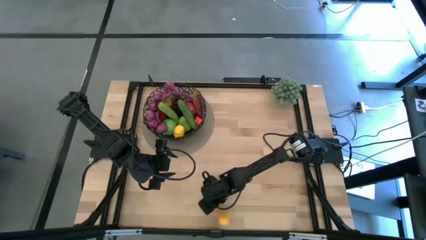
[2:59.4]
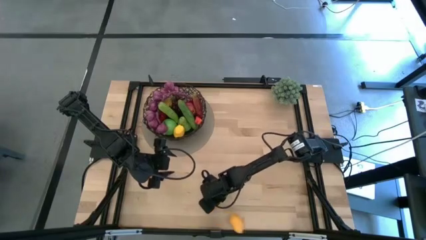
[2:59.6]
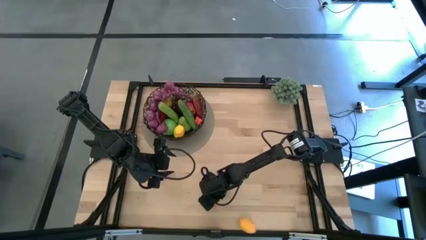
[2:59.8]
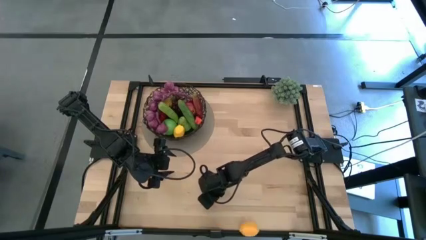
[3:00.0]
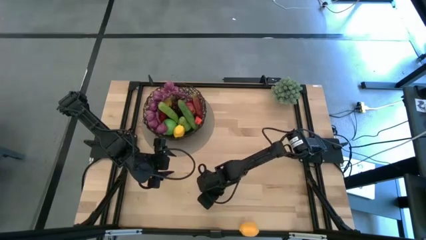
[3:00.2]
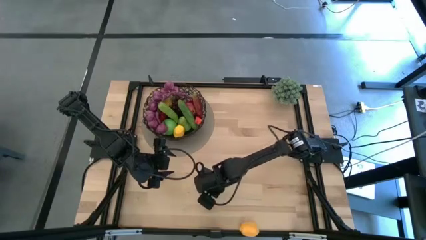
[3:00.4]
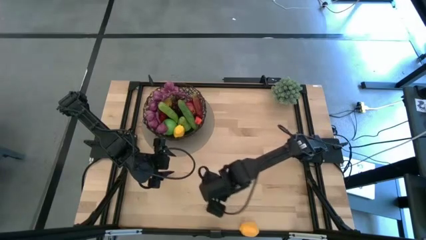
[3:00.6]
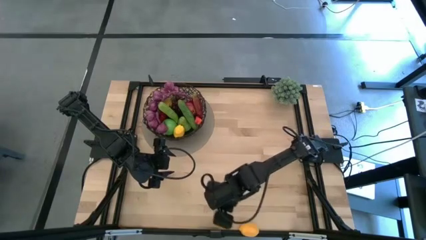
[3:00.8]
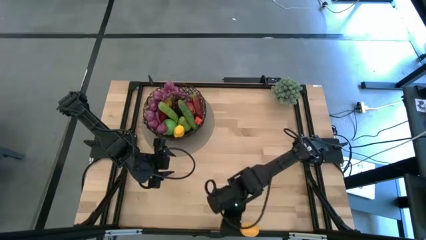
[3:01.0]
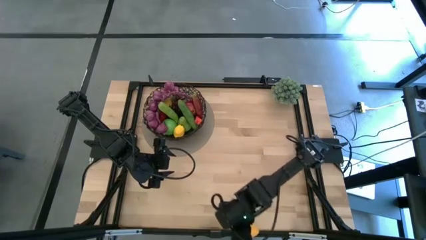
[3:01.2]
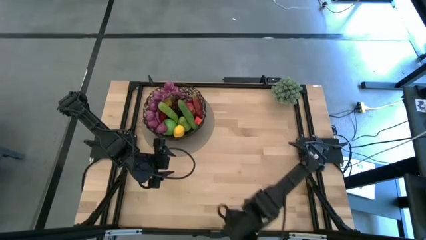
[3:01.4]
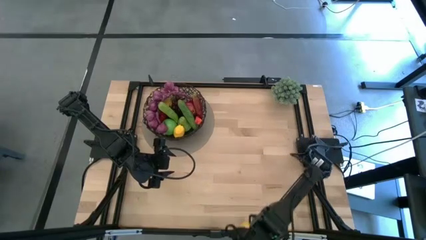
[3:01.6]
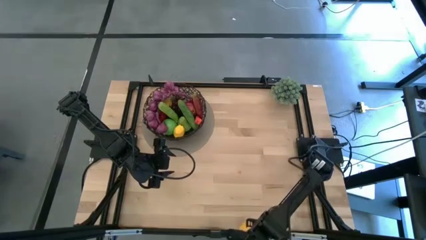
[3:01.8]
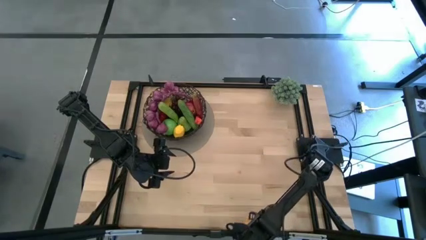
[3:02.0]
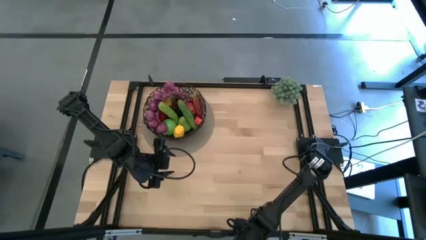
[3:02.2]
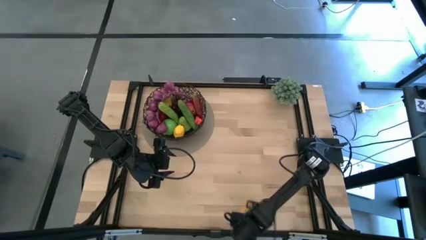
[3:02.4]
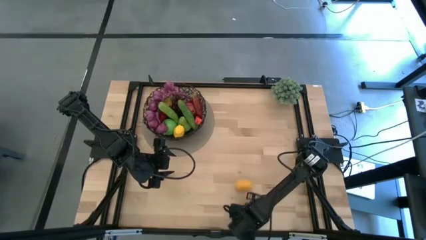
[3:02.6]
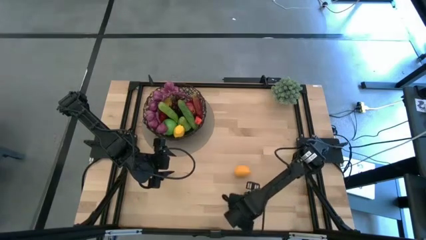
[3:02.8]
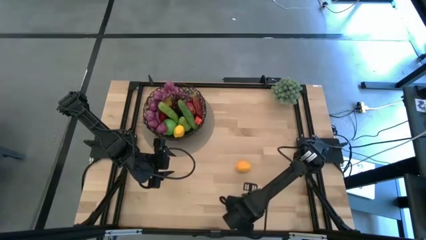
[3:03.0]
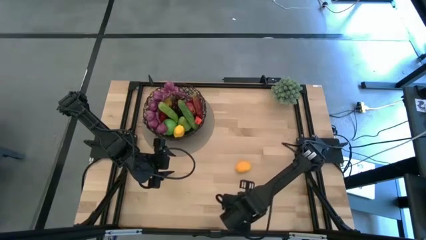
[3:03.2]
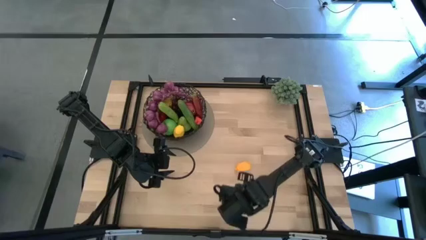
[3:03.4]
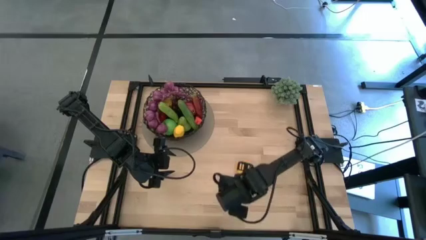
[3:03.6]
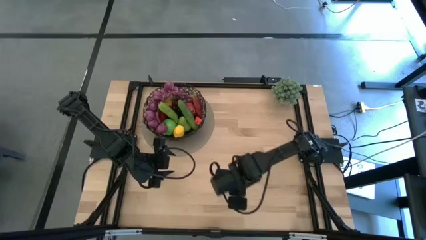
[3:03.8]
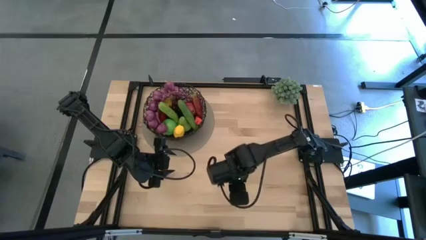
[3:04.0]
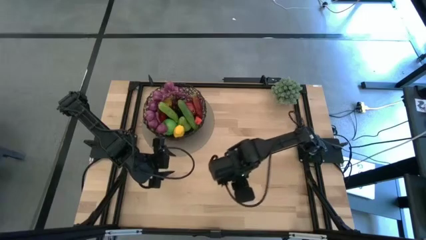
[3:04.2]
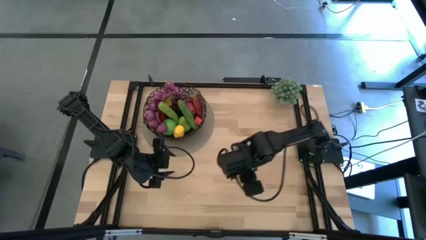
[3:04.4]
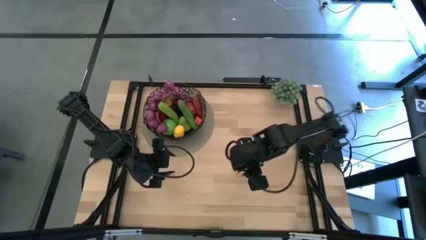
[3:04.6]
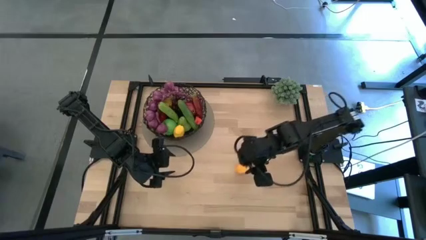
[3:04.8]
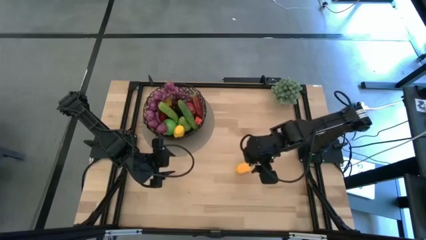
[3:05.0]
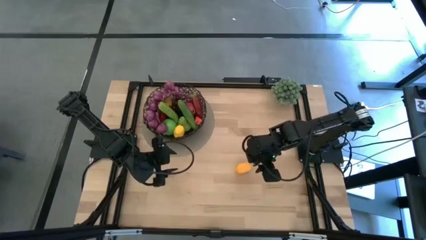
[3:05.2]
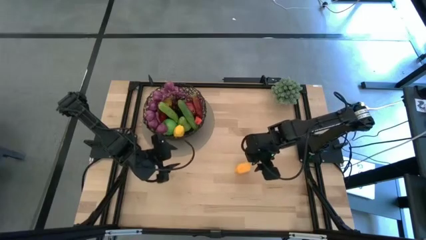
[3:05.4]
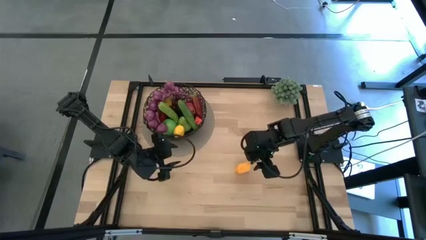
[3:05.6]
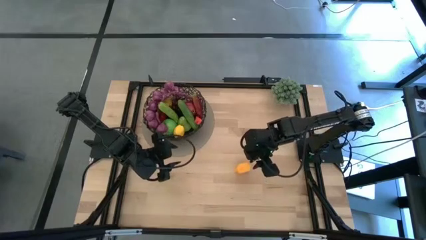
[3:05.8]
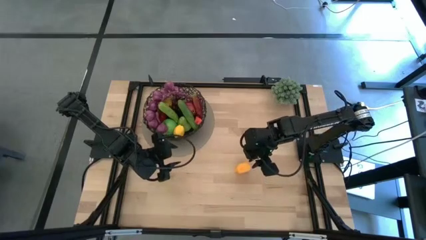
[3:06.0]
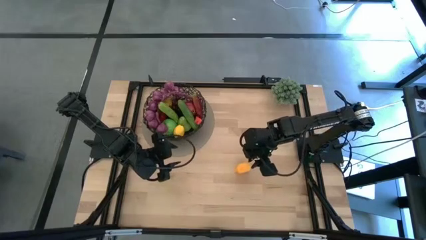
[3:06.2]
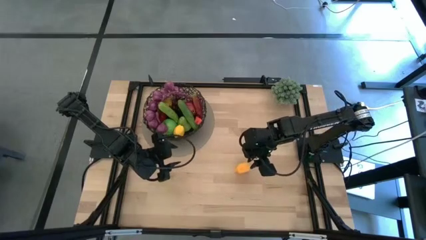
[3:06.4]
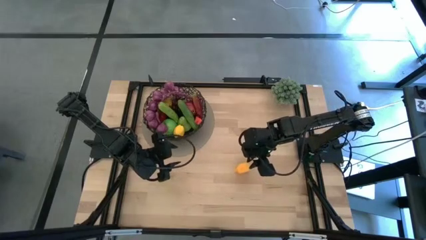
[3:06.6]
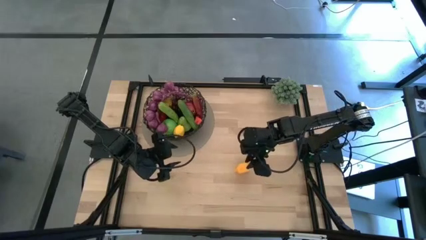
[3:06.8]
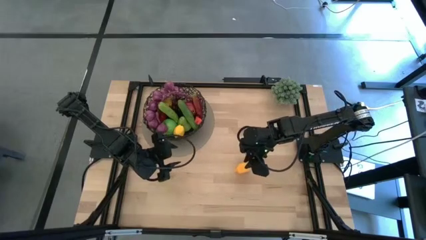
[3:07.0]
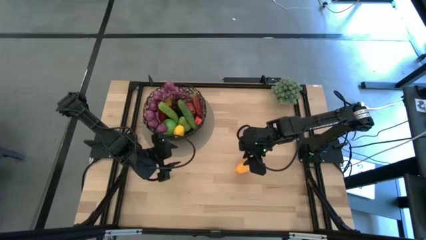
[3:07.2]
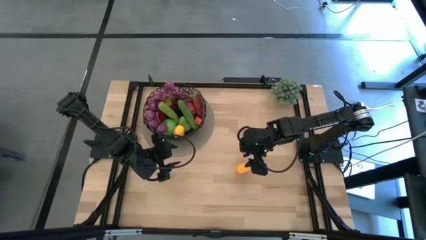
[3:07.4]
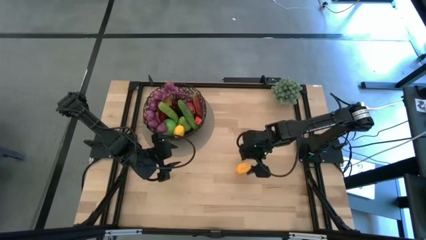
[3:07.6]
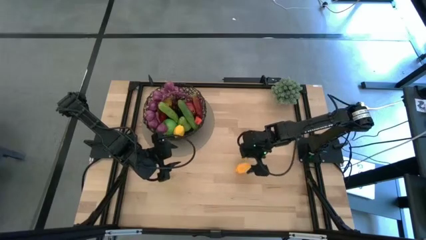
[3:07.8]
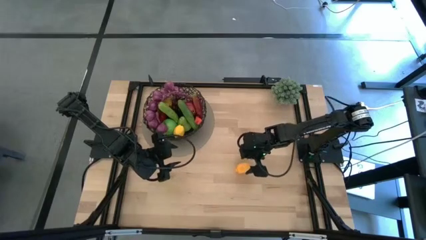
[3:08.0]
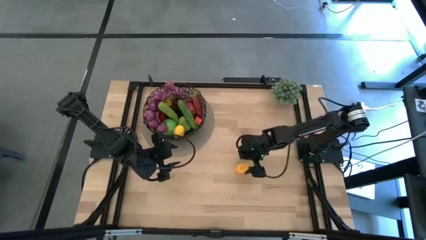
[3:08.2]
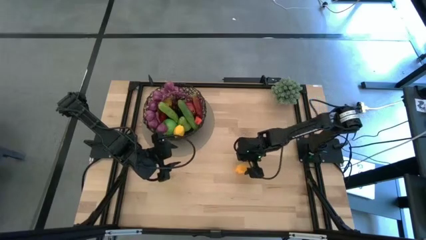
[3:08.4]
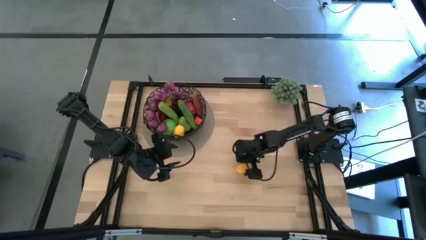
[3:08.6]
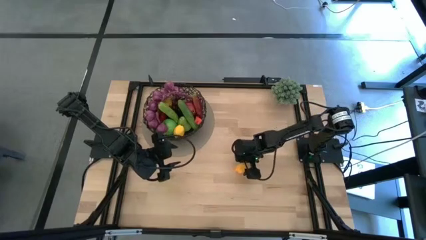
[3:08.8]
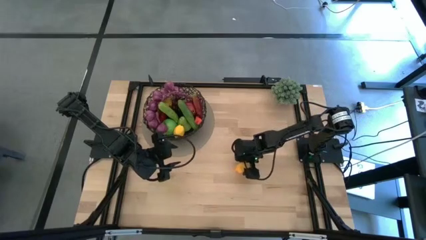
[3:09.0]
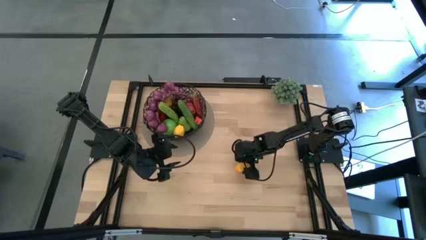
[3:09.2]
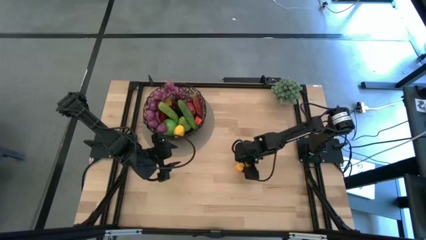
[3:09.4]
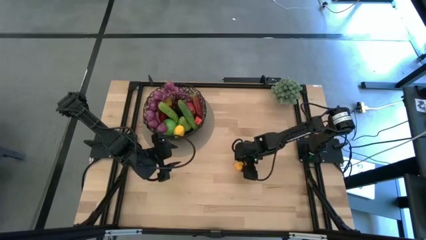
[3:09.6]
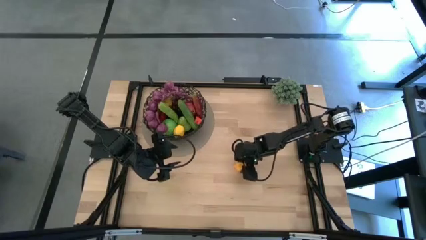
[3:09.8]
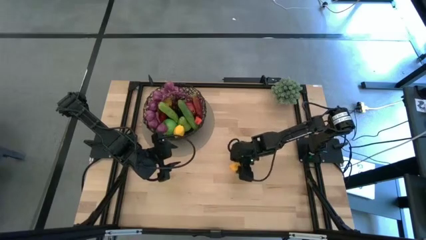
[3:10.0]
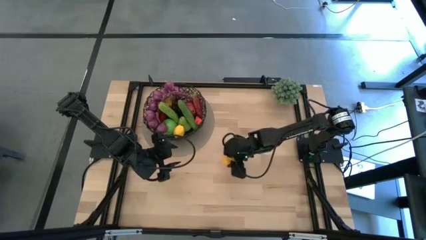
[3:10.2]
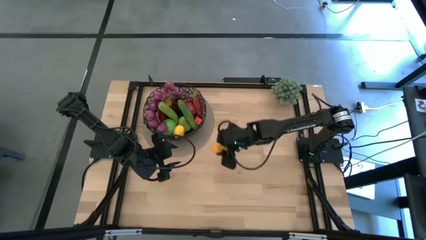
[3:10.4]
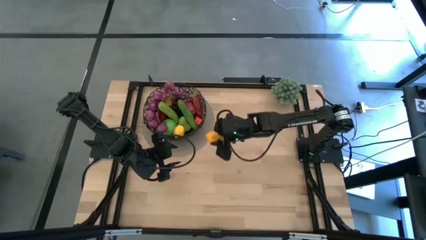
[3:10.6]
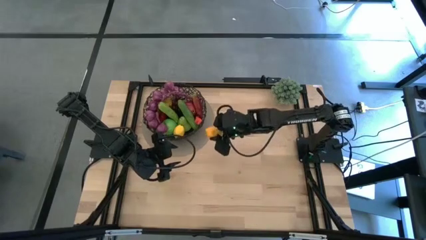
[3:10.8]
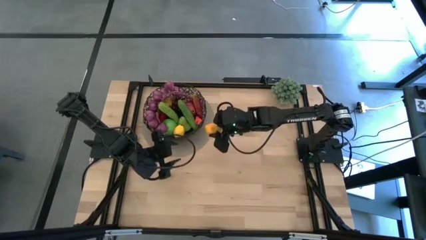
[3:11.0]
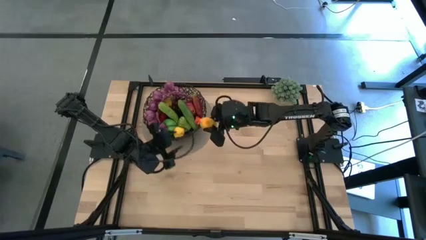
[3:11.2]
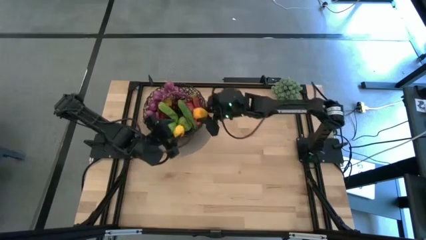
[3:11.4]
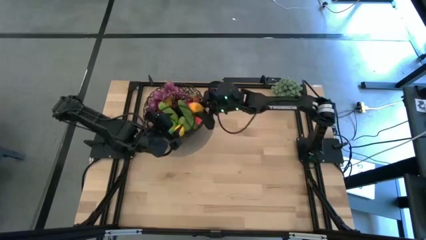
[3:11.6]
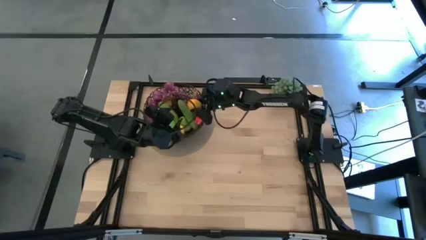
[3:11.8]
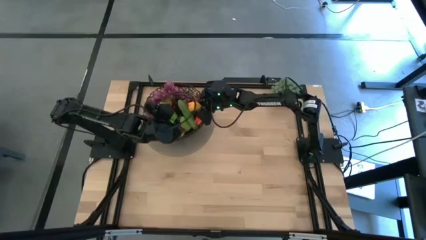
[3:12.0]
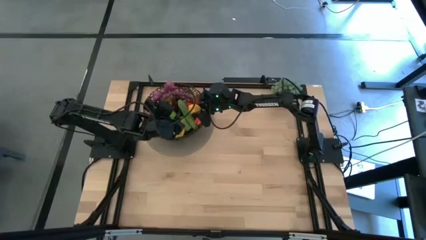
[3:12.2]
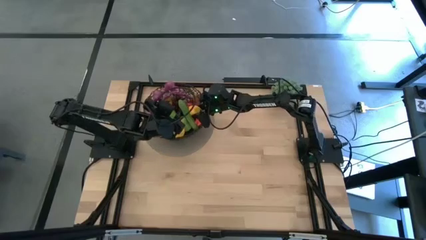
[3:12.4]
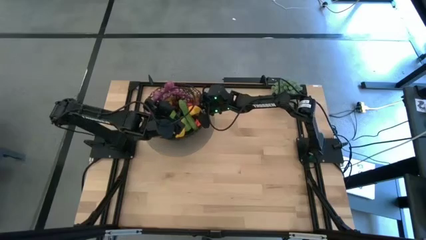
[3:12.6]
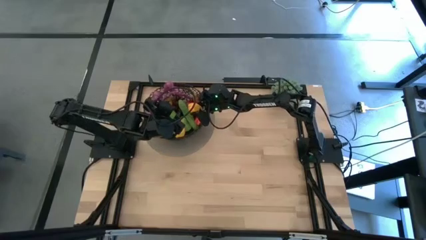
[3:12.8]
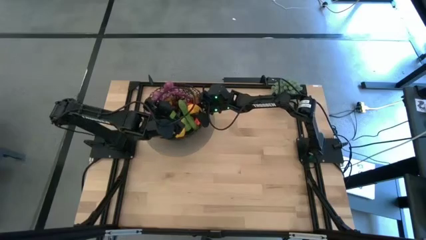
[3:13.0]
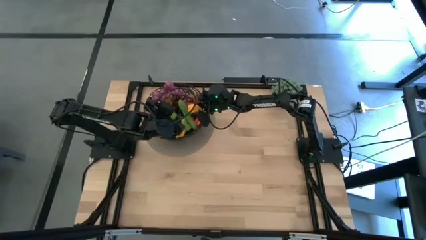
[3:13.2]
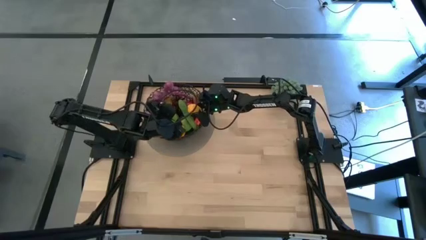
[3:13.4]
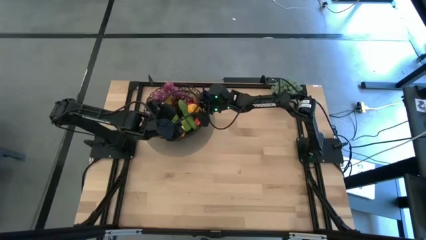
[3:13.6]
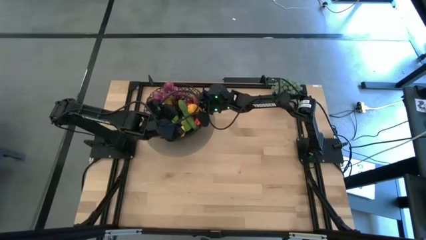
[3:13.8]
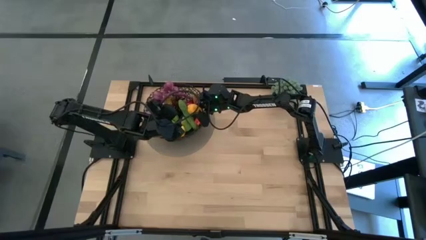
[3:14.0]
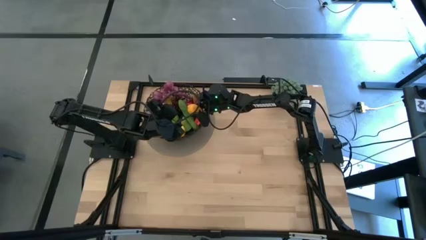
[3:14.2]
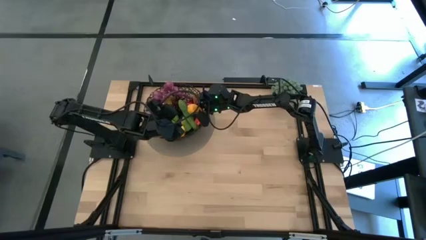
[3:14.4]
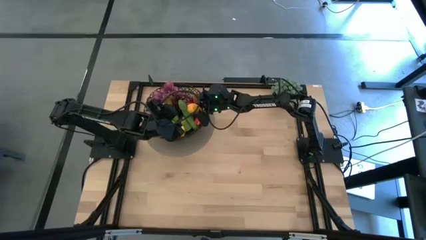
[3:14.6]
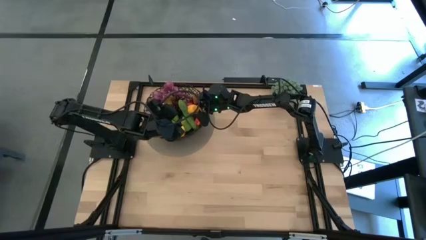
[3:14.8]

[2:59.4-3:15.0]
Task: Build produce basket
Put the yellow lemon into the black wire basket
